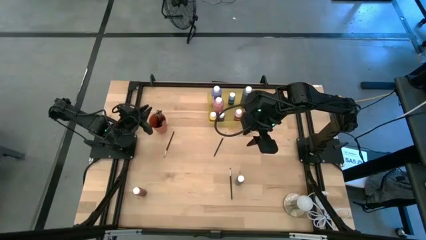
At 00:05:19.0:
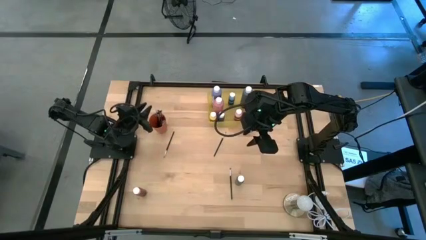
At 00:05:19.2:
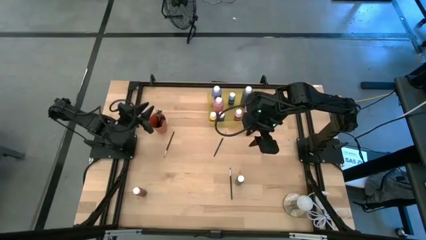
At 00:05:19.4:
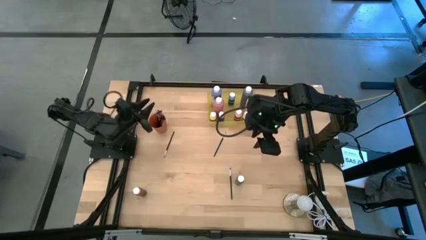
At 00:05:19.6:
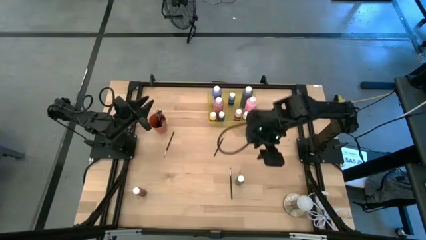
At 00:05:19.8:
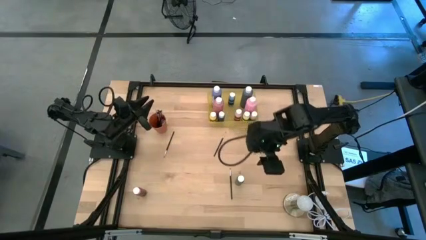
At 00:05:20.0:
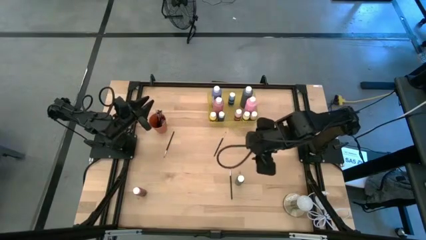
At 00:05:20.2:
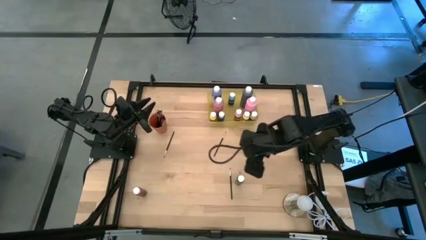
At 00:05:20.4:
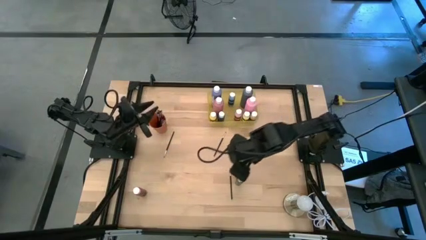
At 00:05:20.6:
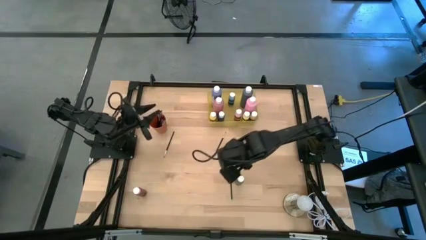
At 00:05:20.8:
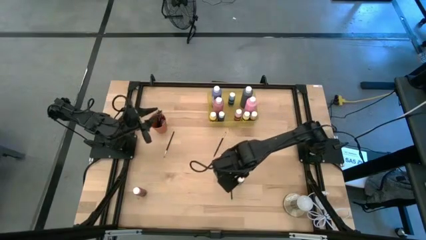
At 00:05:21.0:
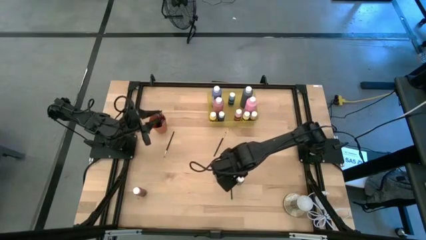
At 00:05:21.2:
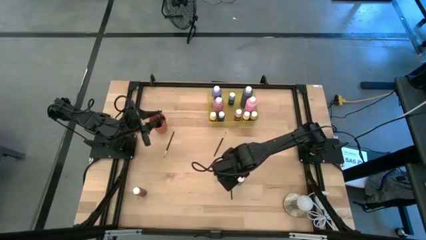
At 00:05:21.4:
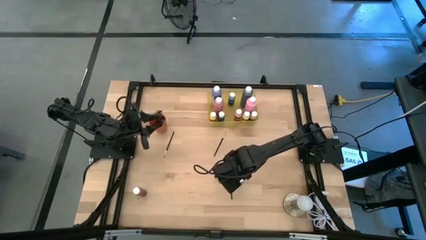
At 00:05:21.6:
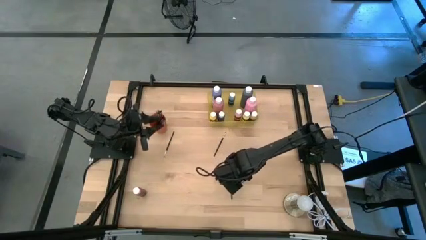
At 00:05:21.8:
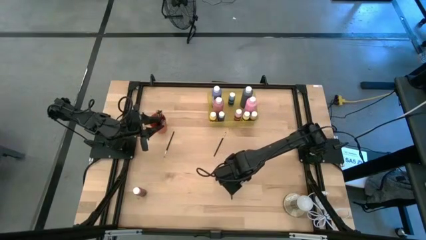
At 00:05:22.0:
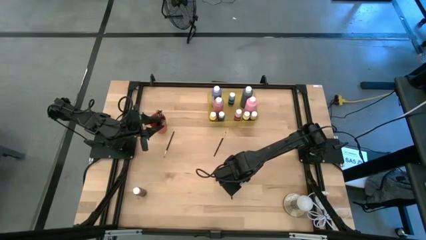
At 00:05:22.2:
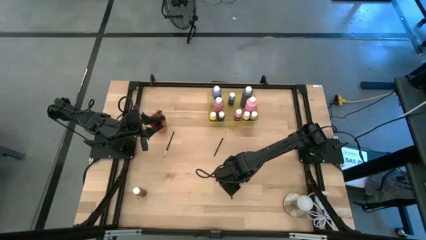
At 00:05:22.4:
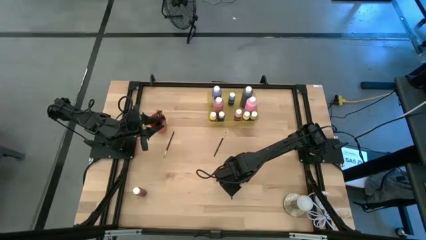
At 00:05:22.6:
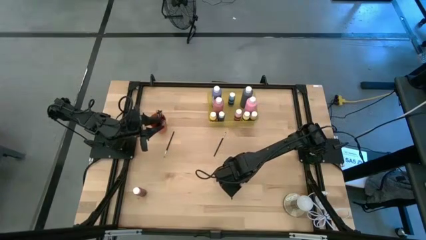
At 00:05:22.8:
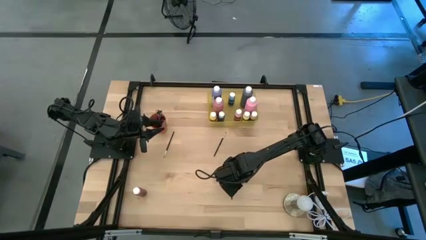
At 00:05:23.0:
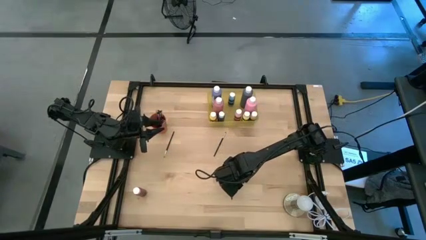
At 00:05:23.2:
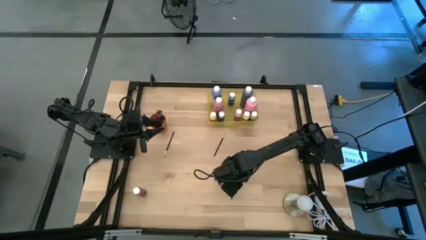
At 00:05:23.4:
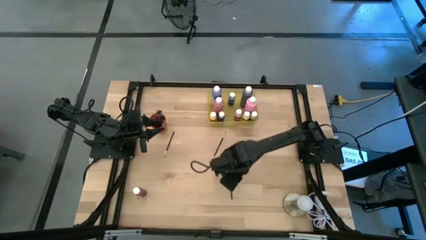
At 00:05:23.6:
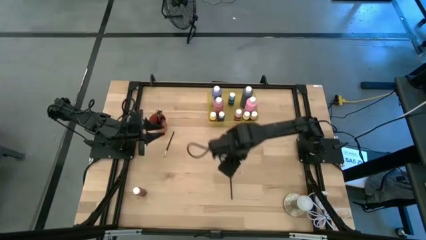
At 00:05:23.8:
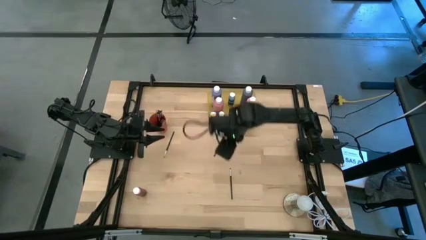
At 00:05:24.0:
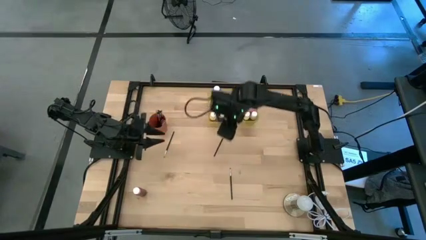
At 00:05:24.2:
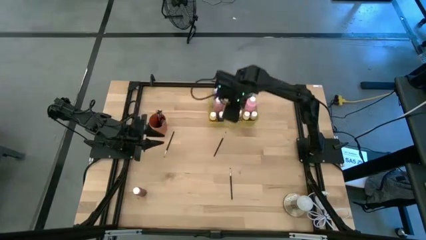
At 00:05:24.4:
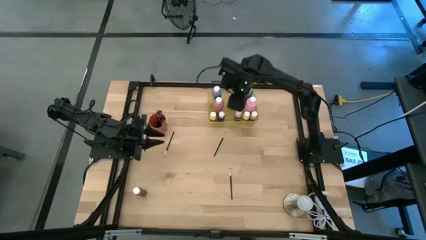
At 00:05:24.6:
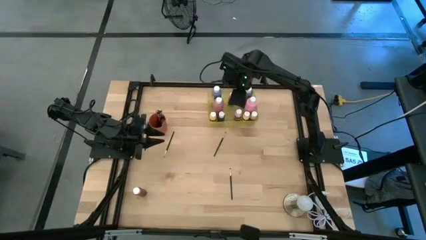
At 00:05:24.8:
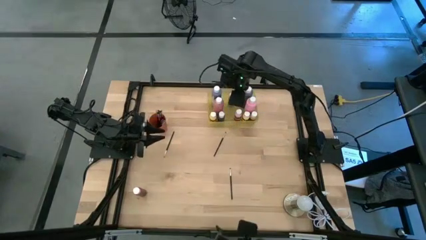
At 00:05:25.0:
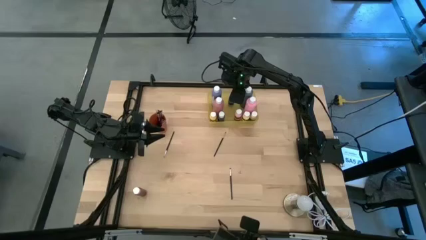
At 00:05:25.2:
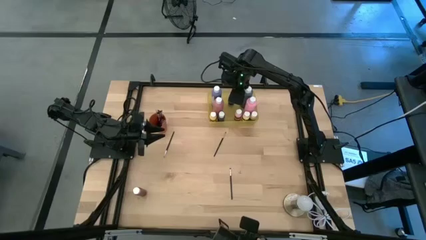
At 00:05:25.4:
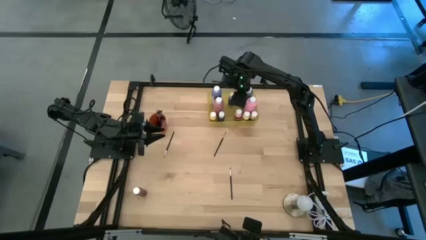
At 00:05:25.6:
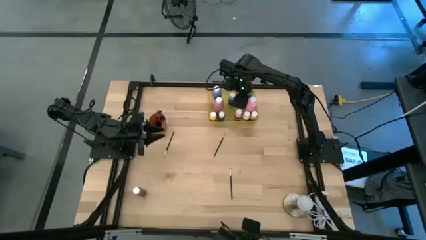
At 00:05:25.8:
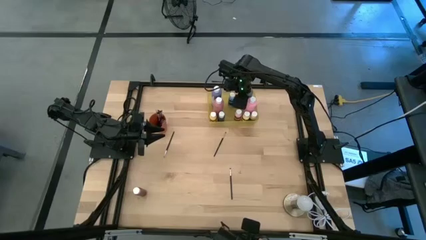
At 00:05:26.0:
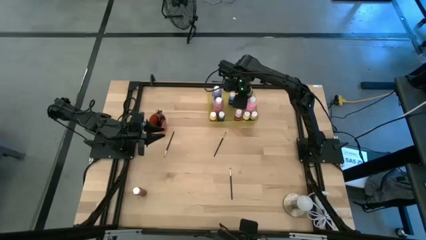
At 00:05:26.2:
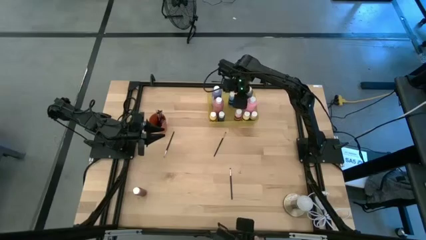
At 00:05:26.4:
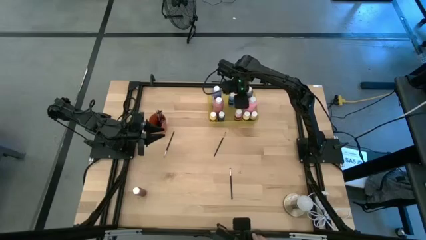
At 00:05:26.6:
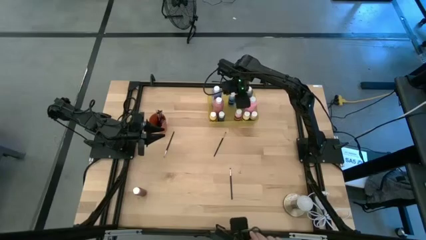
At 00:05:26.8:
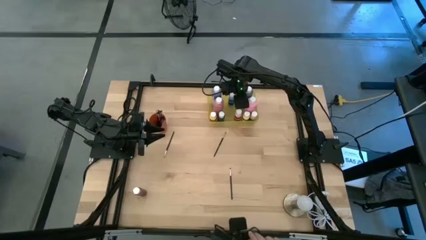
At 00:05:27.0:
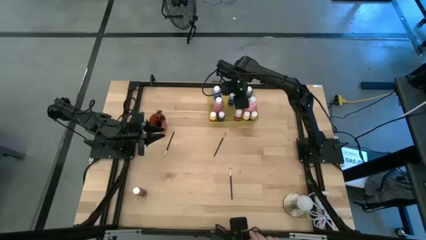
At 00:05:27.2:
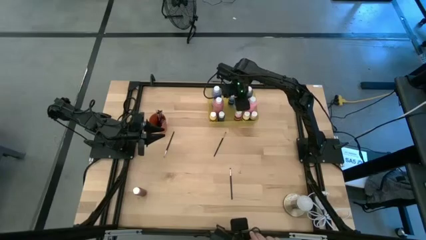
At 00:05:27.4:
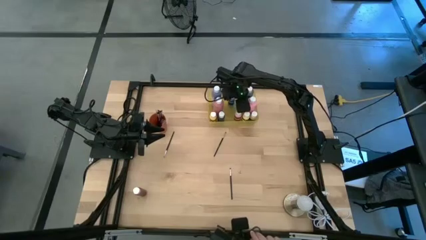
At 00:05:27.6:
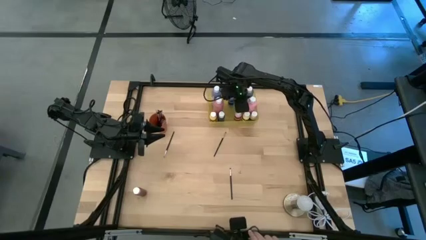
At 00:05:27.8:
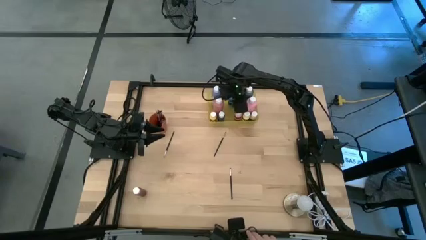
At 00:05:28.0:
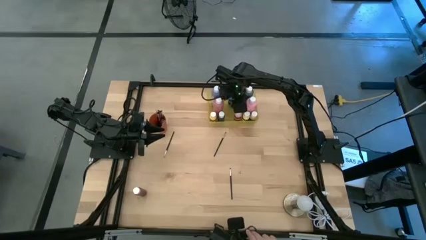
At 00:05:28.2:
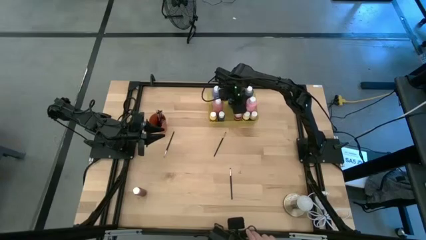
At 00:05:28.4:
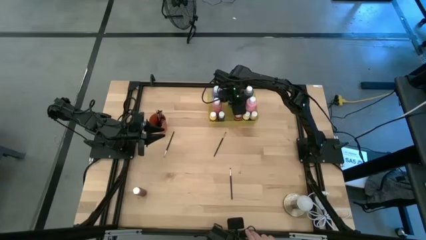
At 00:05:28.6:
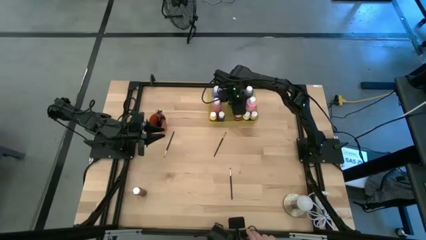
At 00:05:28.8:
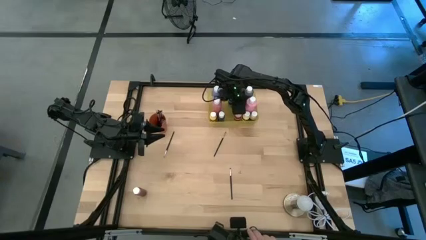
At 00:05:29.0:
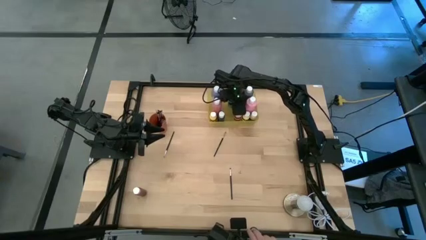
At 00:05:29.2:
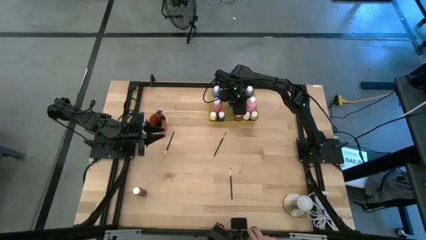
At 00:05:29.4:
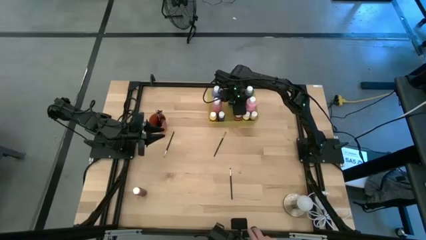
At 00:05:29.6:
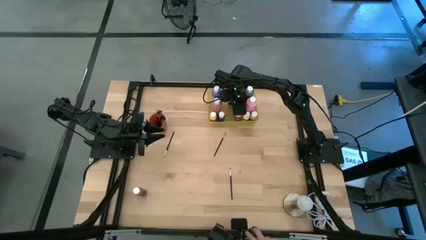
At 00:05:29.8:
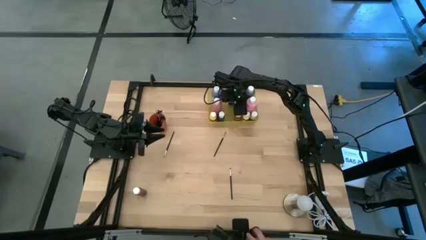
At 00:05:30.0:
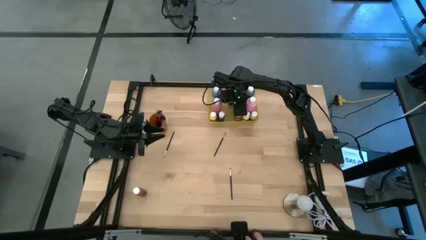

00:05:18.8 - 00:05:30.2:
Task: Pick & Place Paint Supplies
Put the small green paint bottle into the yellow bin

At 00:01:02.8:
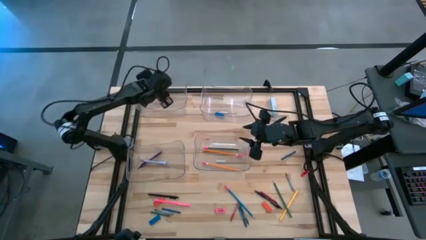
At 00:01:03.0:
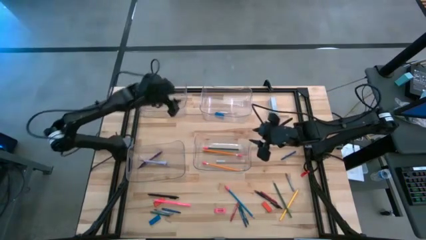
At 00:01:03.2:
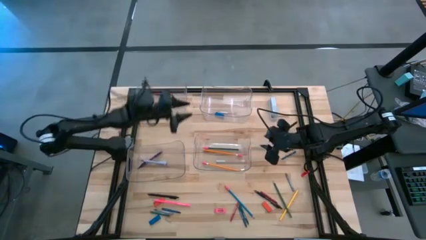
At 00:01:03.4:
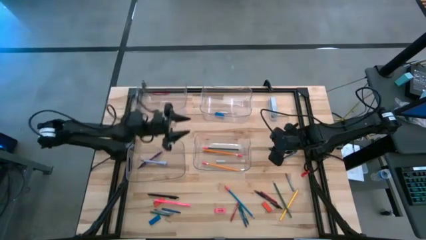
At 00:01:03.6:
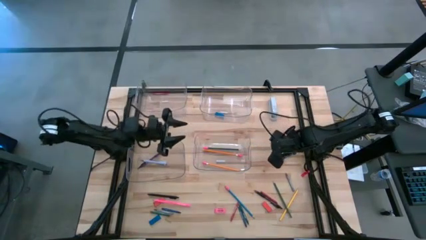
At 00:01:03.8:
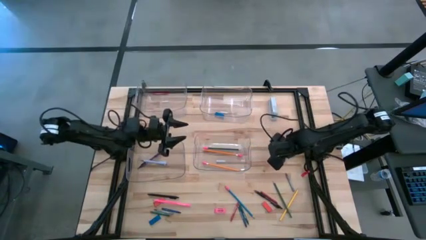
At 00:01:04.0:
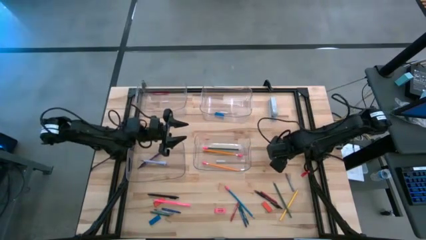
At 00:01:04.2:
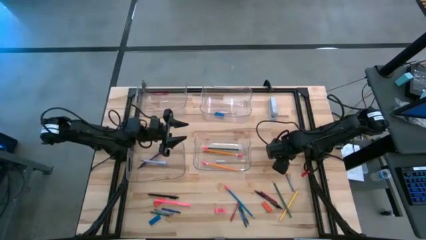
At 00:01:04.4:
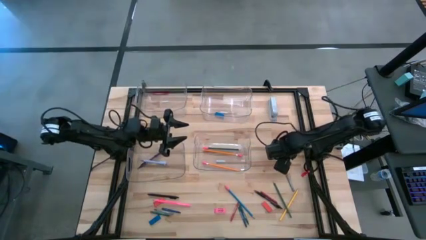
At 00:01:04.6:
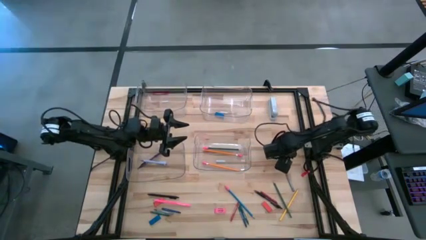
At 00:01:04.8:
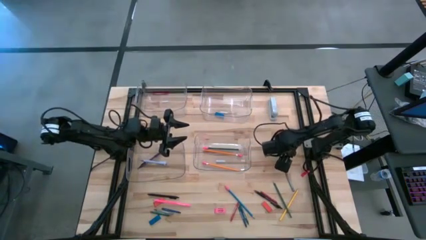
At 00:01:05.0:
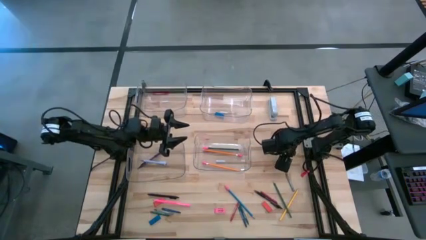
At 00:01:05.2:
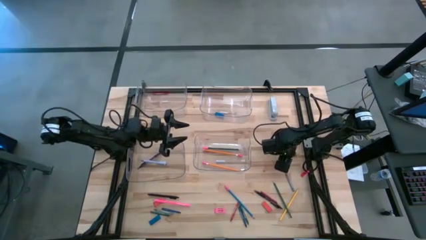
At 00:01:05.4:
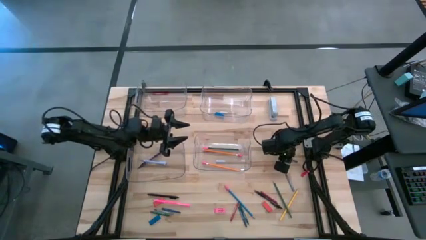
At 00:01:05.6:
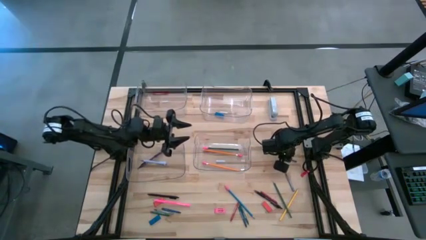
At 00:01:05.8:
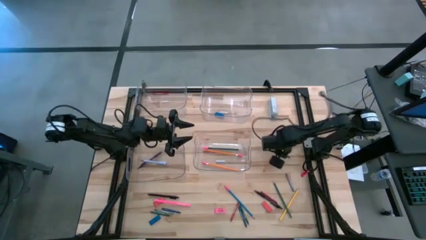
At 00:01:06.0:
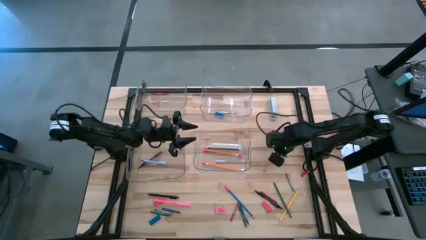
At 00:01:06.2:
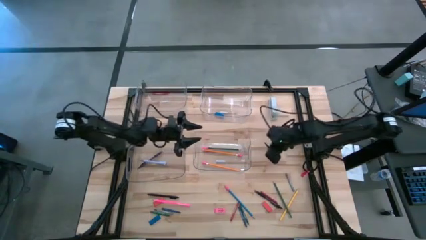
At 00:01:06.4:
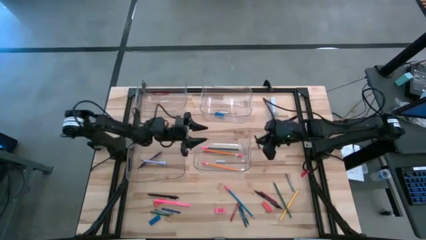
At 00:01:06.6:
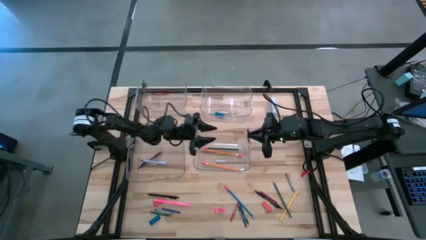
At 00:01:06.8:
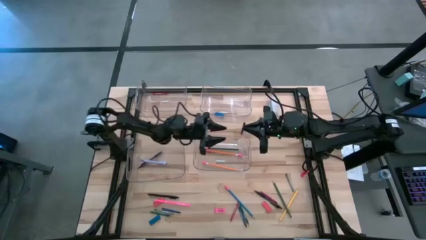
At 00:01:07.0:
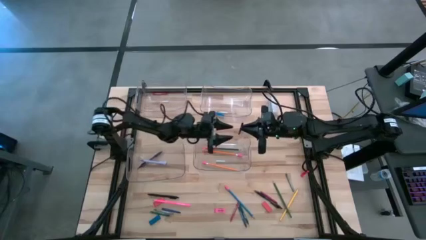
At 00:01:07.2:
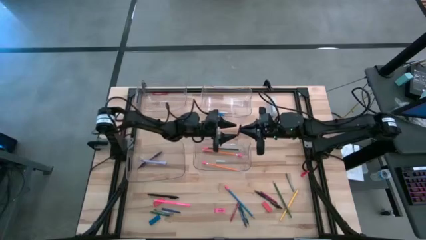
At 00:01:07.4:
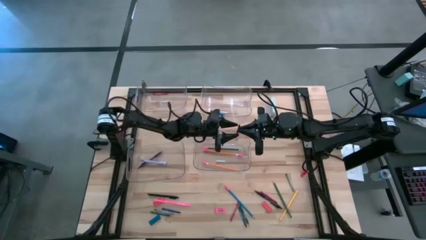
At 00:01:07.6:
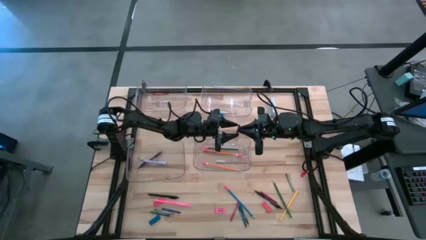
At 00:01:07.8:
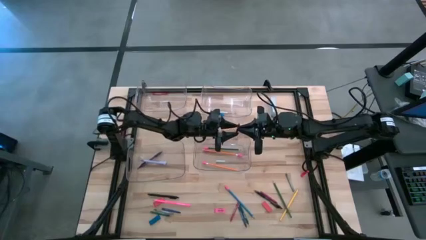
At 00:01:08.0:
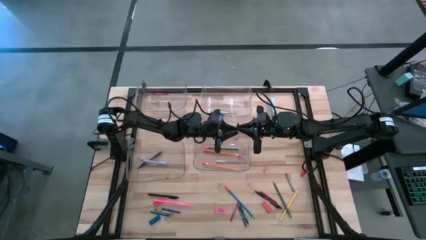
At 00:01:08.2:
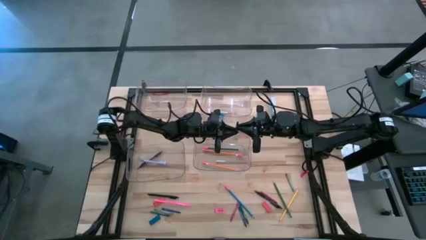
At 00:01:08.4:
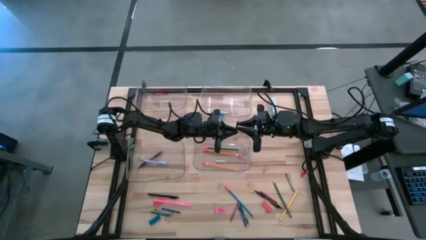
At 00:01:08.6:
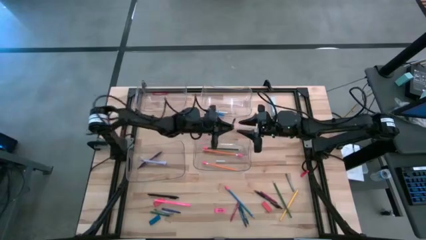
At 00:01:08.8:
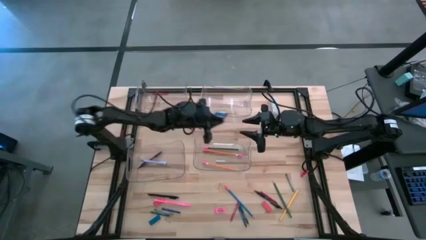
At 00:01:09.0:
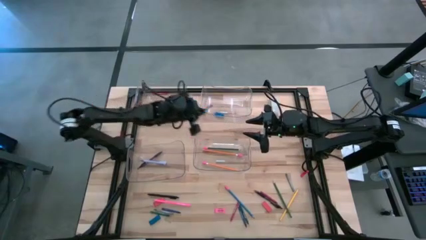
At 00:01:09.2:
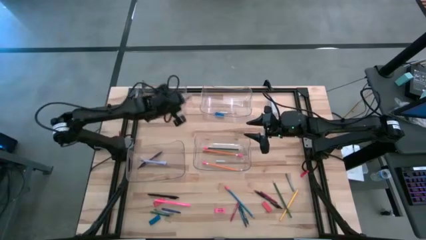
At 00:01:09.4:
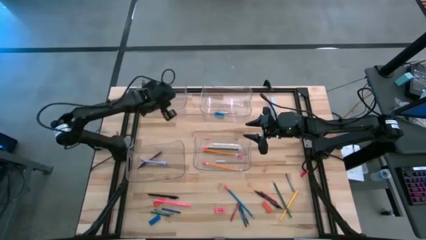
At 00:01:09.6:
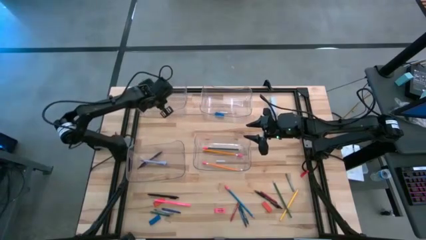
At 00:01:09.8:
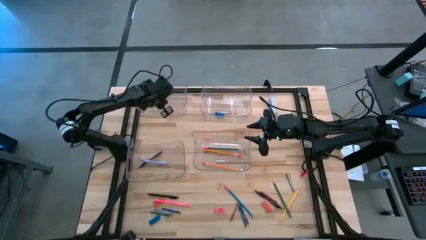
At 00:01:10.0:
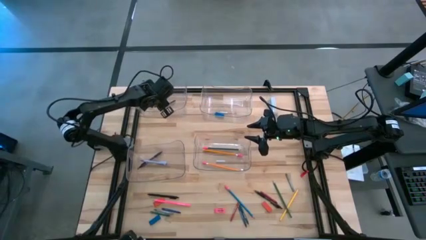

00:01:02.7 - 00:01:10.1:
Task: Sort crayons/erasers/pens/pencils in bins
Put the top blue crayon into the top left transparent bin
